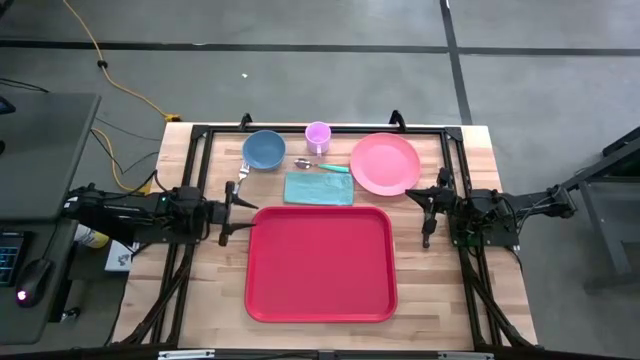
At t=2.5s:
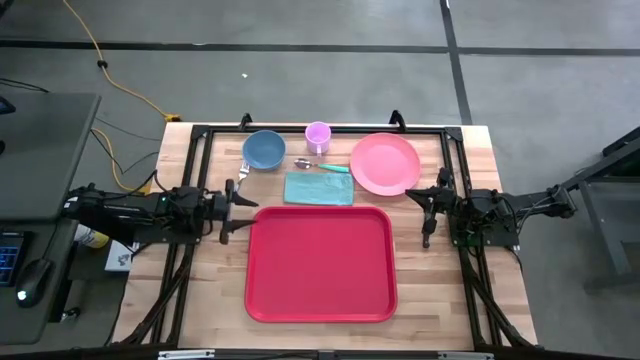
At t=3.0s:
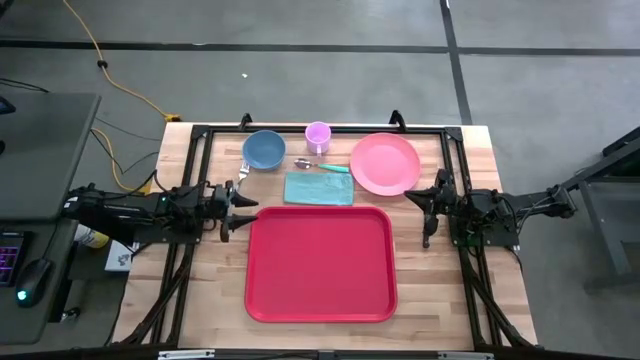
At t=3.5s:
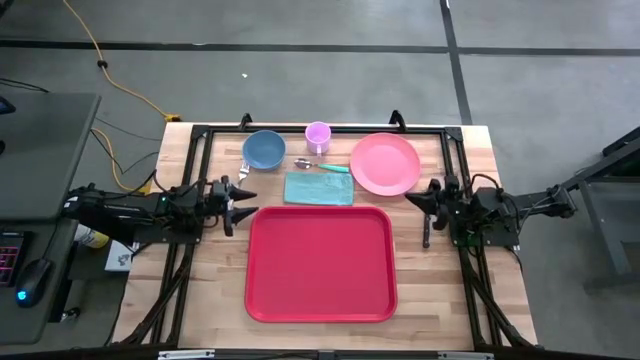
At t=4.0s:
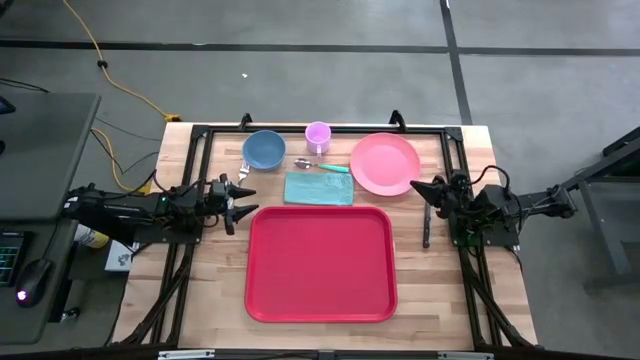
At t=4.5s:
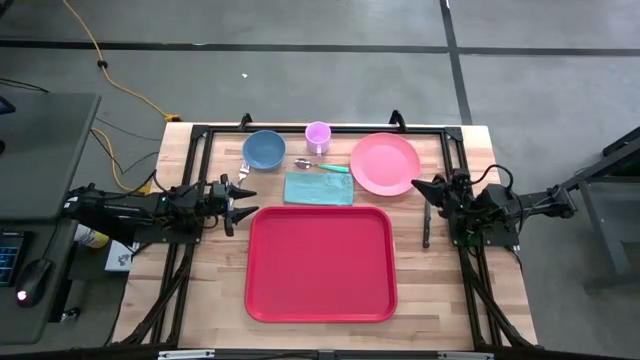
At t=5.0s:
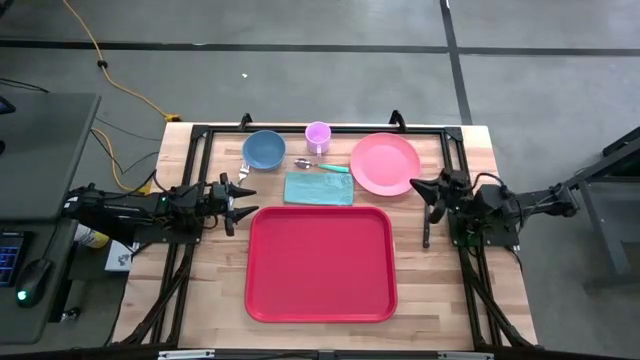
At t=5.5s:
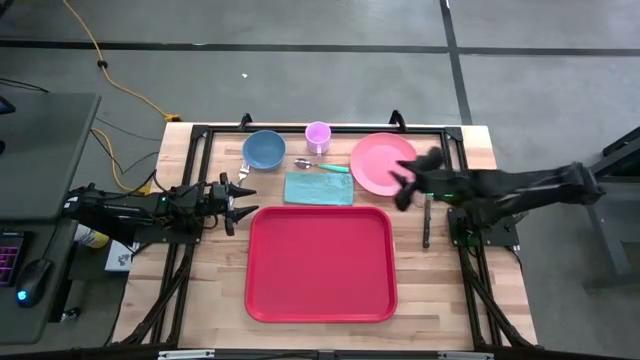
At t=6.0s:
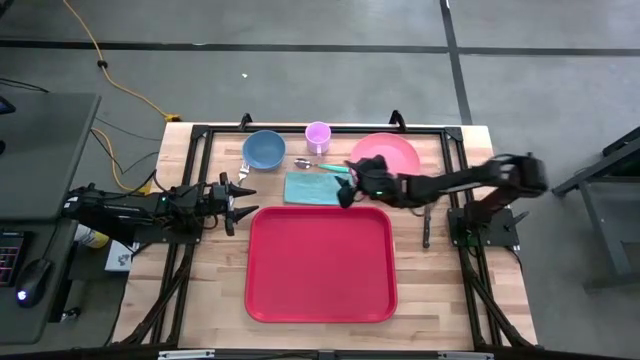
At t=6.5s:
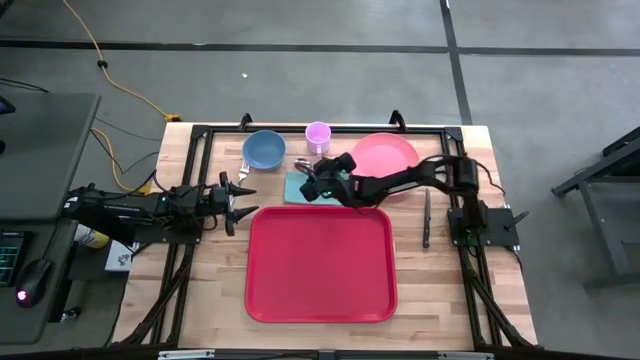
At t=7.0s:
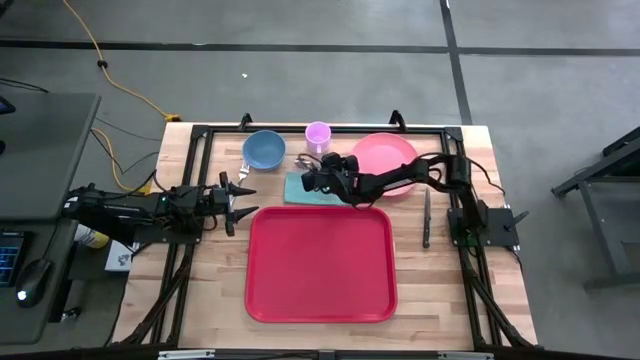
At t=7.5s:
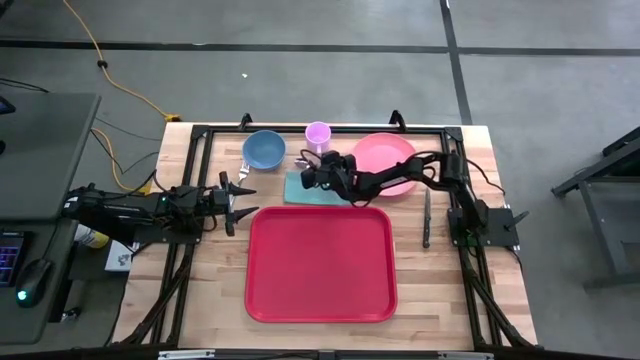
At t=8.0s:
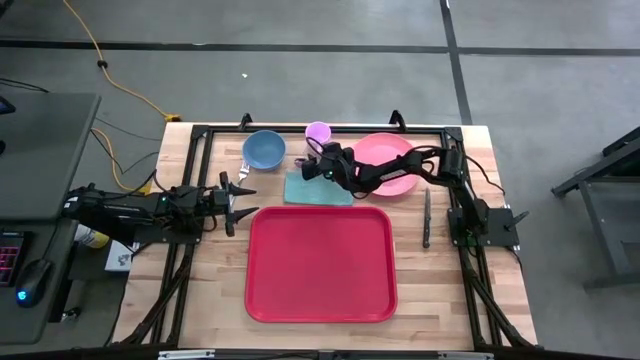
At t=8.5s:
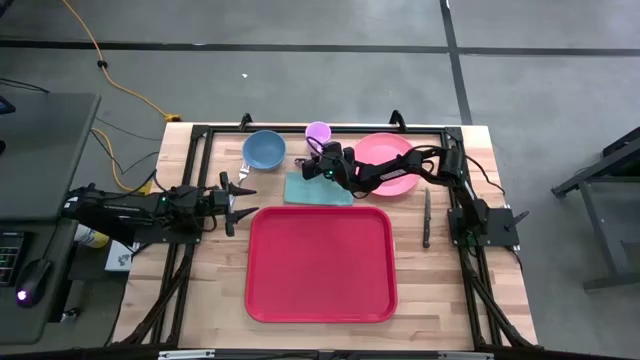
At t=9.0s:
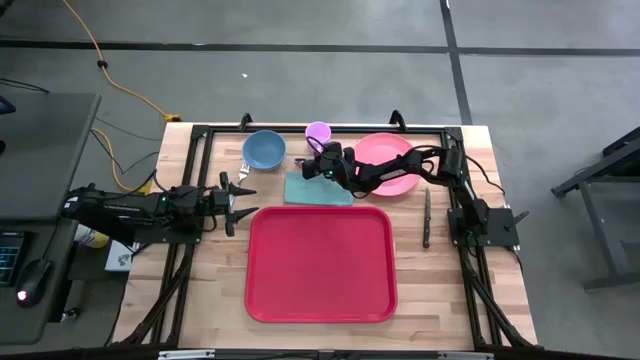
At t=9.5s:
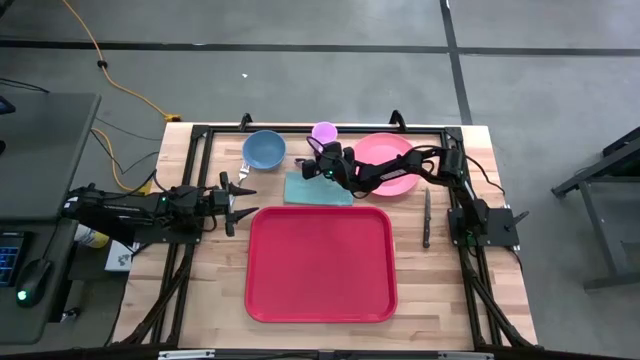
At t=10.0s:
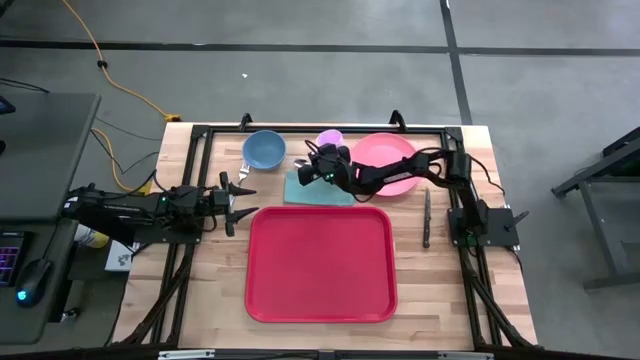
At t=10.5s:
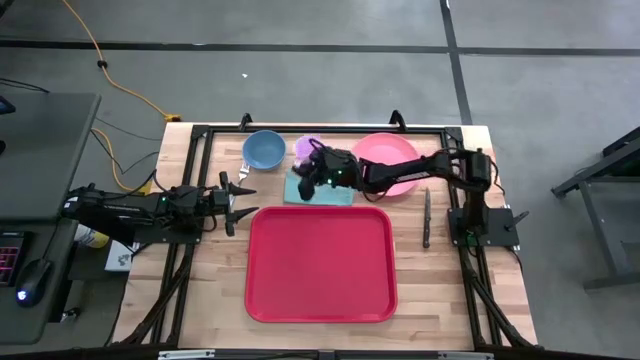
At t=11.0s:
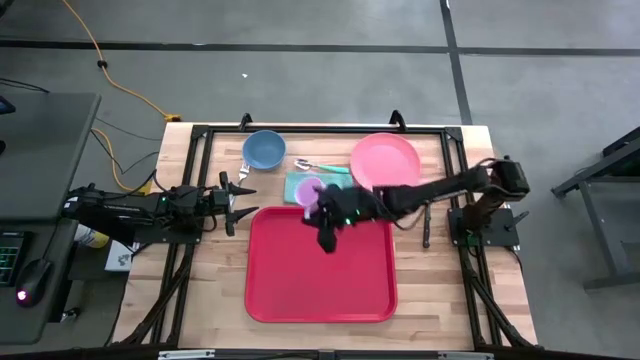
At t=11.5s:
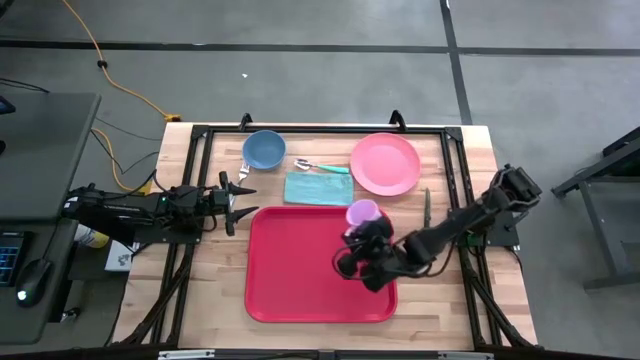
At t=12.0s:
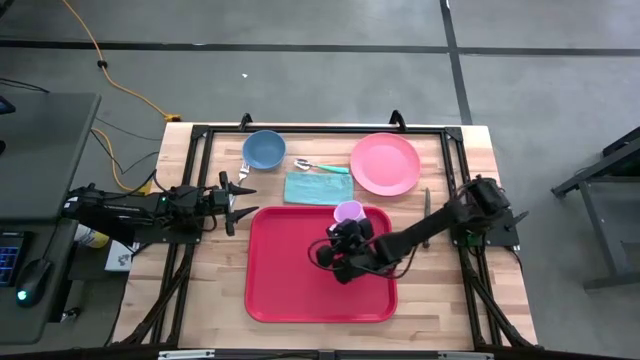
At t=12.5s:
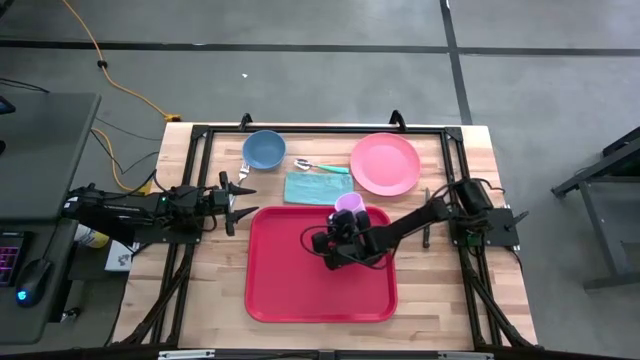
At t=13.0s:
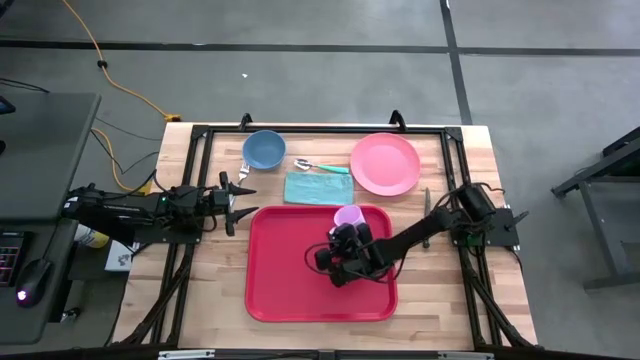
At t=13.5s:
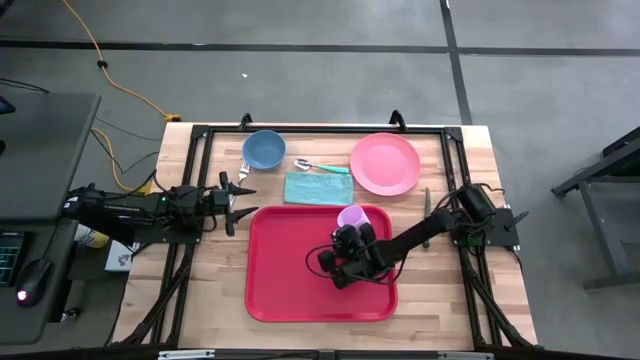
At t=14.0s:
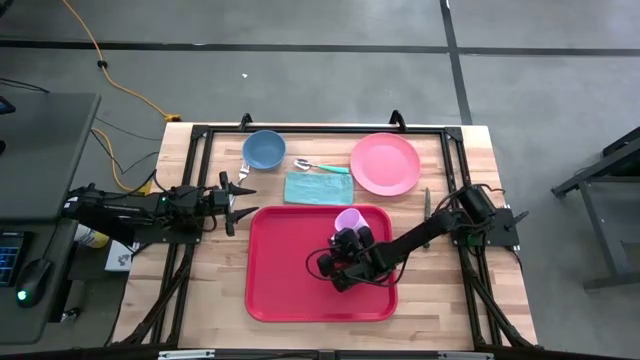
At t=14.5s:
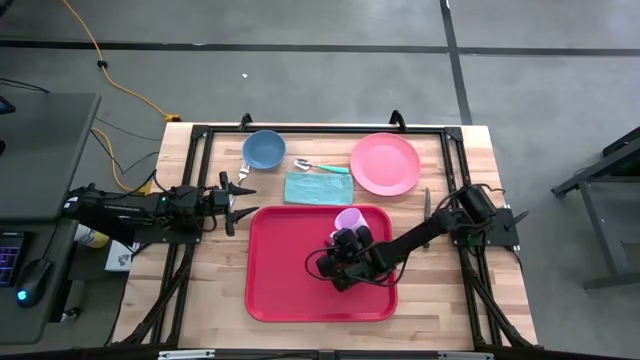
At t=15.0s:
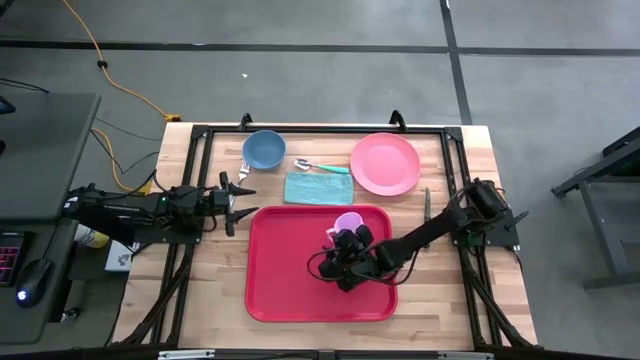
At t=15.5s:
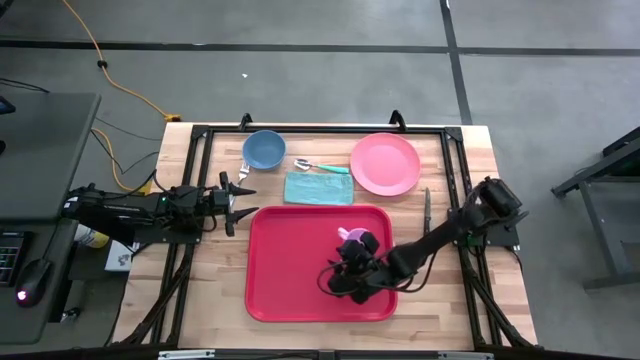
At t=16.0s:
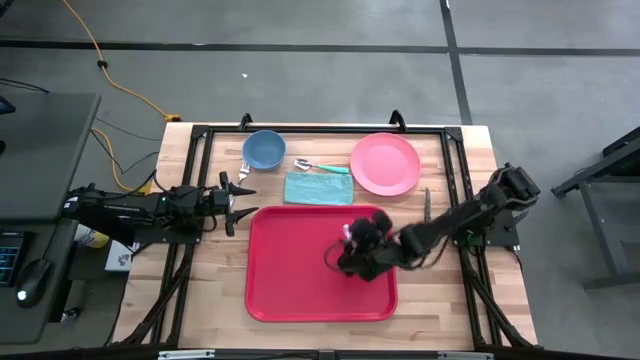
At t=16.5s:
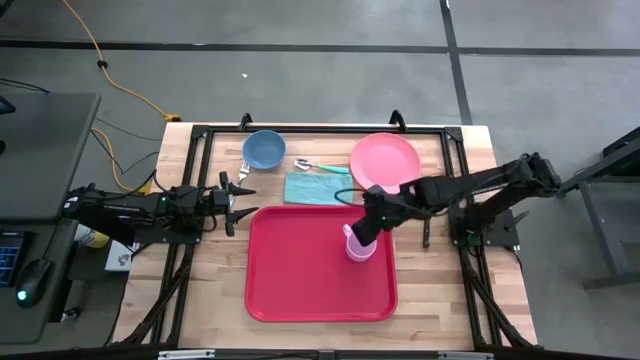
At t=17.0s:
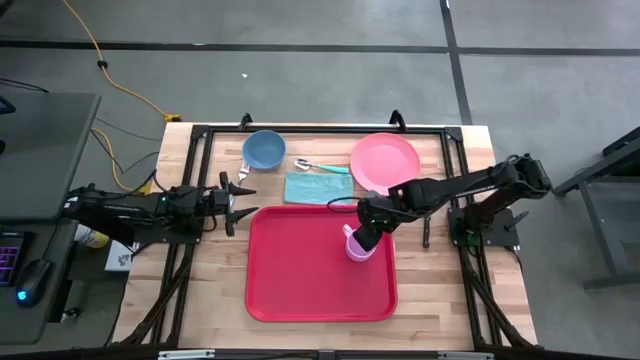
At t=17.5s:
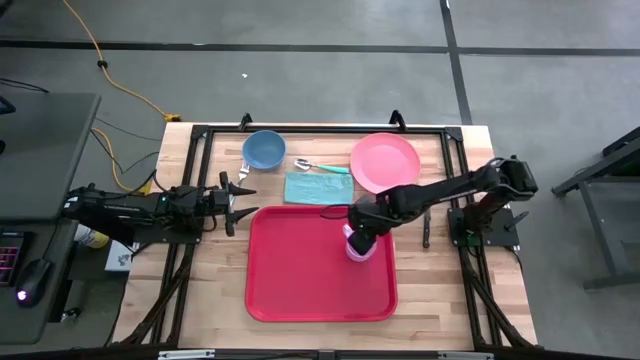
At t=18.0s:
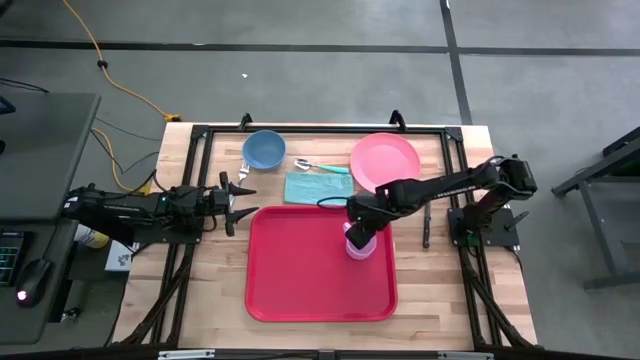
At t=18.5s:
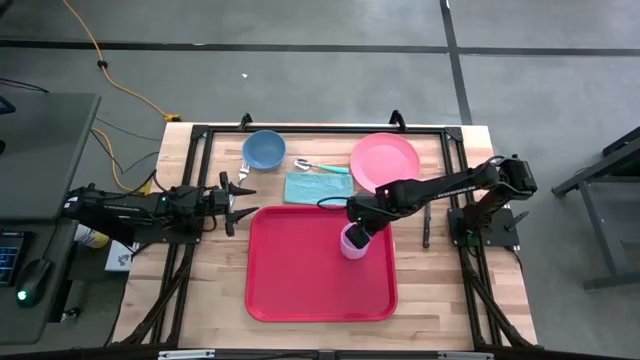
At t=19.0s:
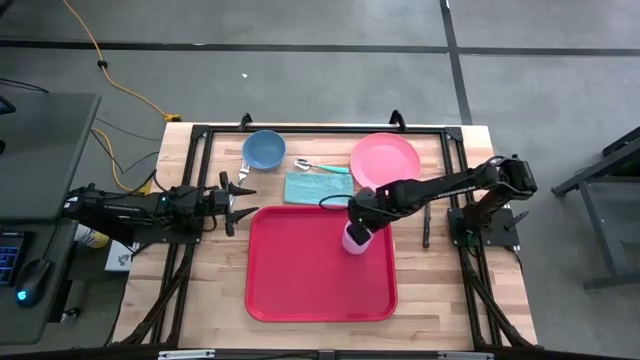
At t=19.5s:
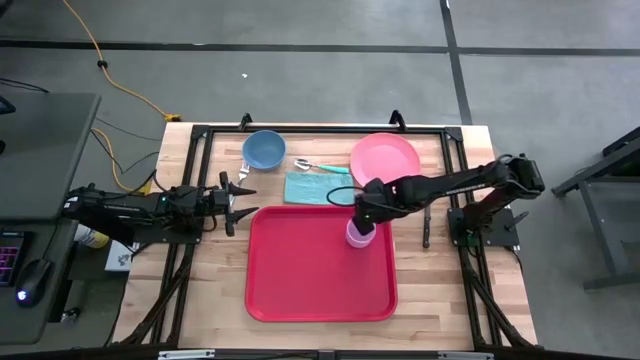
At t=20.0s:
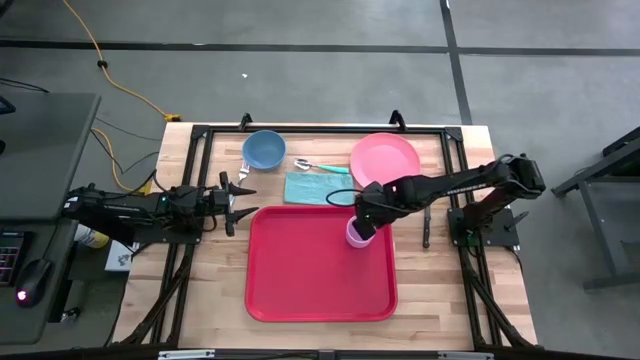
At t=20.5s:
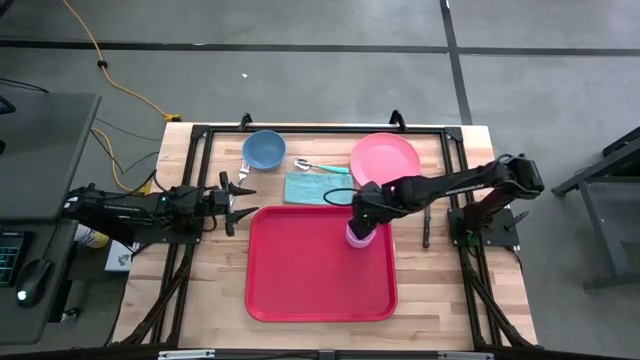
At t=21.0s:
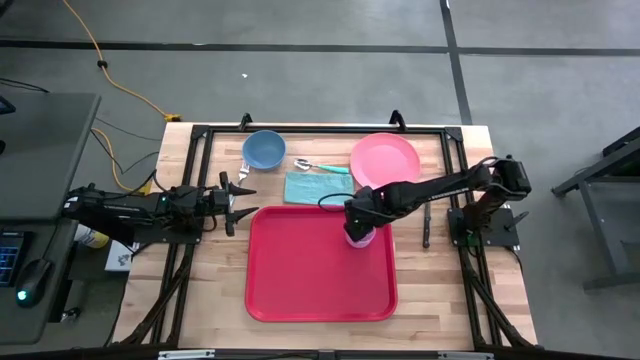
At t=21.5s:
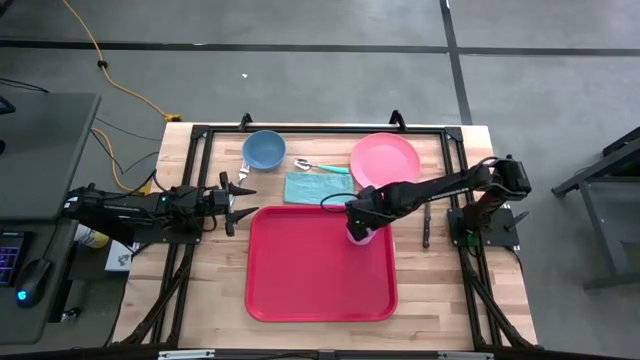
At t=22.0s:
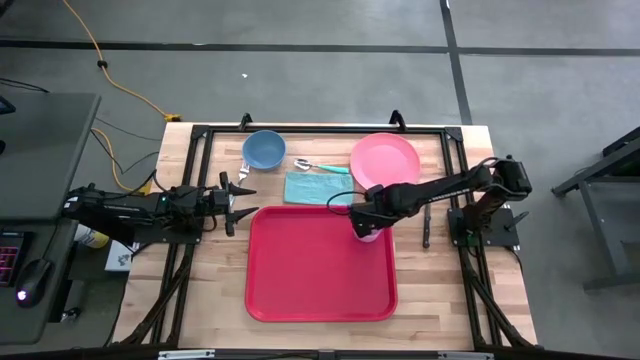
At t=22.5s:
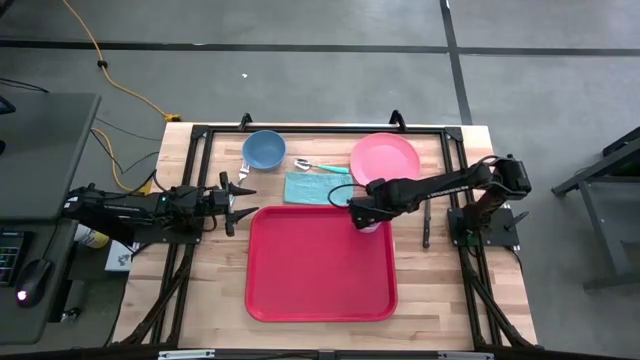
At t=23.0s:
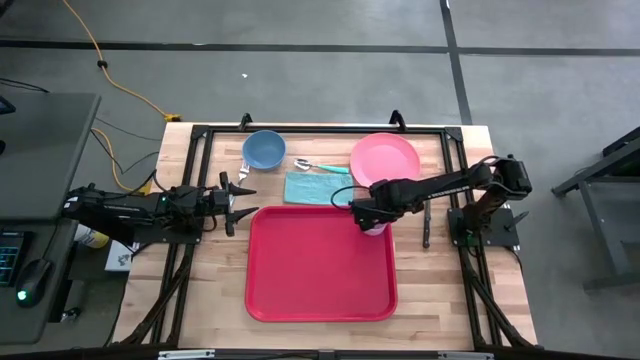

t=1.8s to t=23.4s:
Task: Set up tray
Put the pink mug on the top right of the red serving tray
